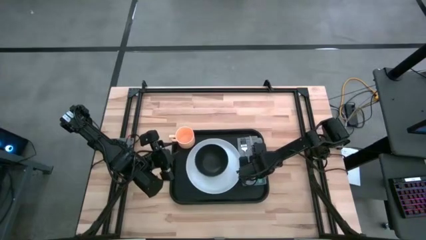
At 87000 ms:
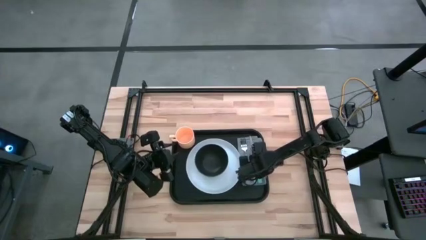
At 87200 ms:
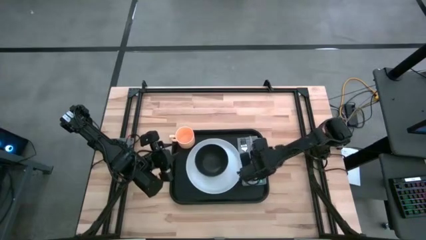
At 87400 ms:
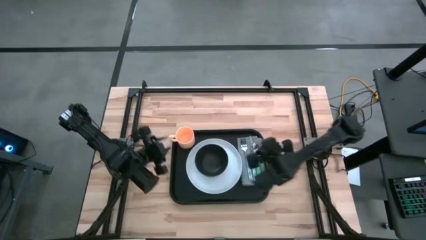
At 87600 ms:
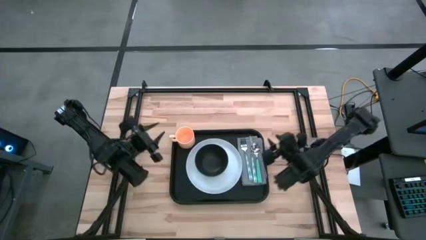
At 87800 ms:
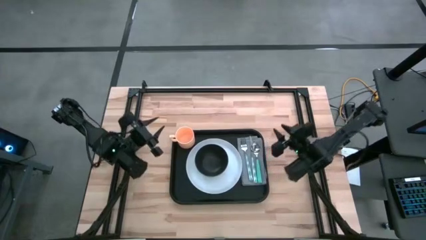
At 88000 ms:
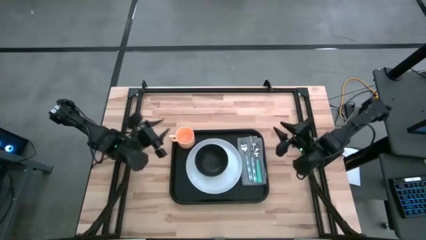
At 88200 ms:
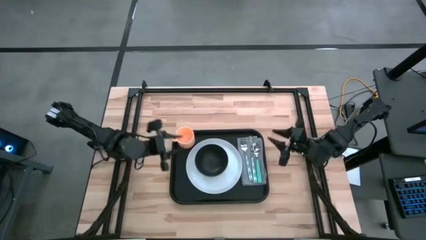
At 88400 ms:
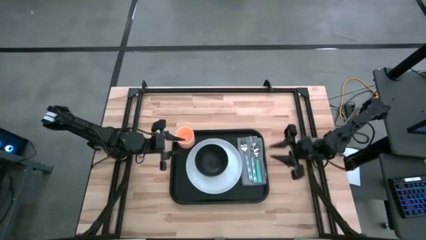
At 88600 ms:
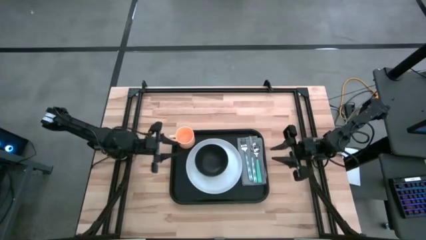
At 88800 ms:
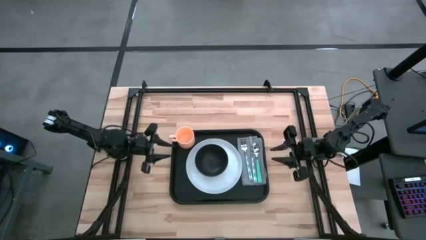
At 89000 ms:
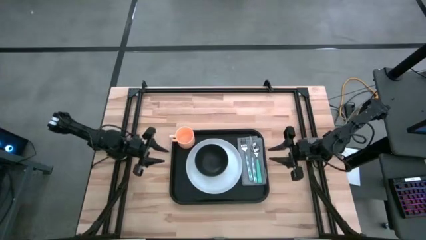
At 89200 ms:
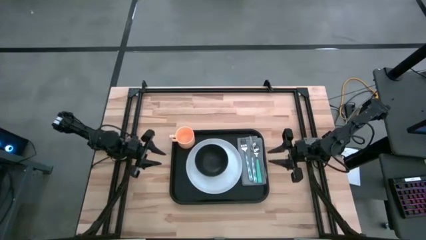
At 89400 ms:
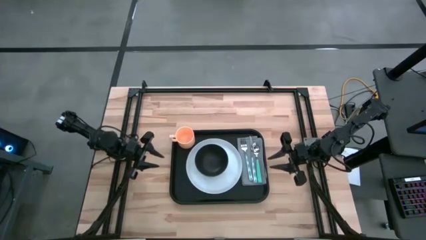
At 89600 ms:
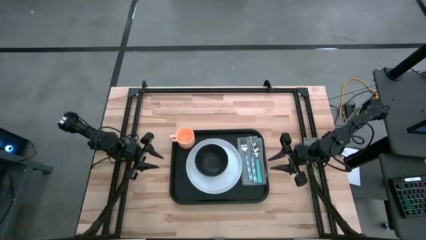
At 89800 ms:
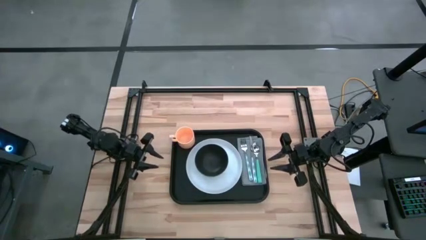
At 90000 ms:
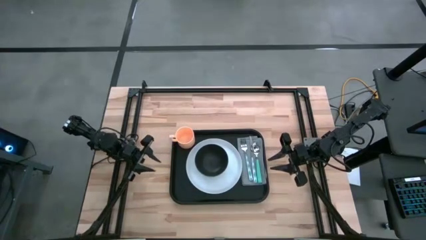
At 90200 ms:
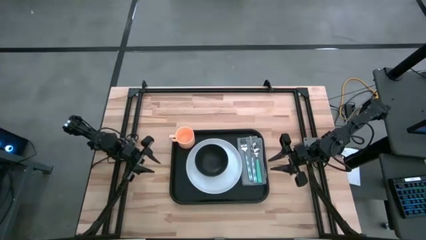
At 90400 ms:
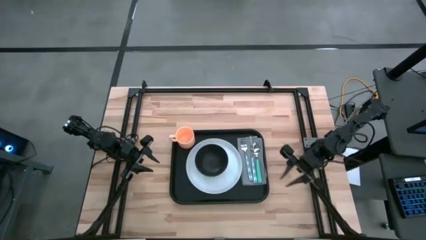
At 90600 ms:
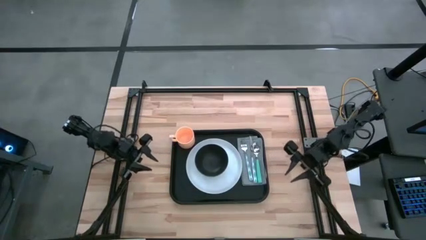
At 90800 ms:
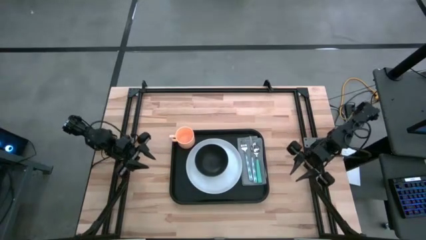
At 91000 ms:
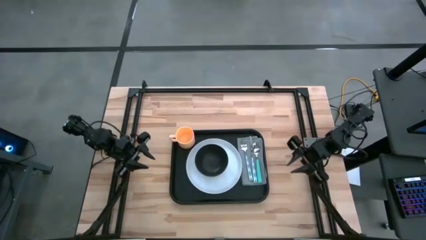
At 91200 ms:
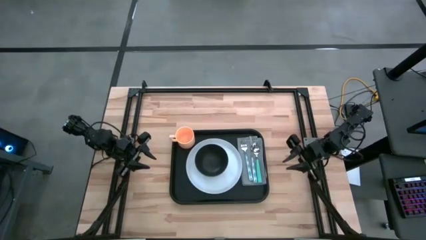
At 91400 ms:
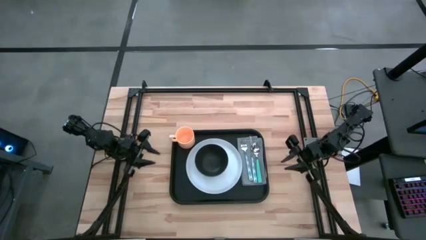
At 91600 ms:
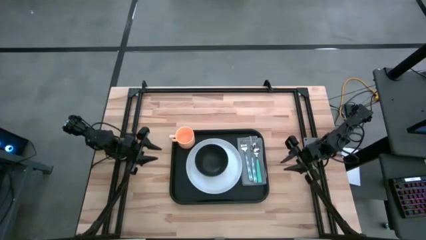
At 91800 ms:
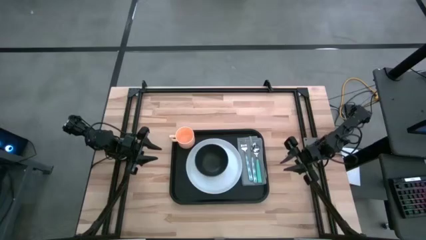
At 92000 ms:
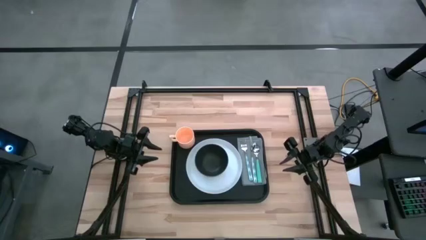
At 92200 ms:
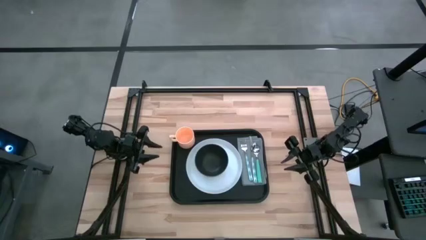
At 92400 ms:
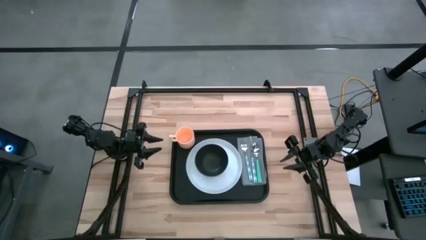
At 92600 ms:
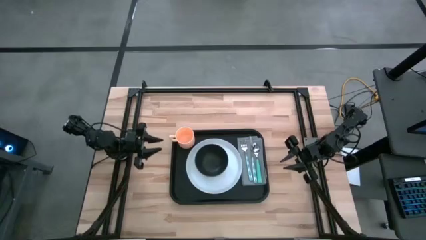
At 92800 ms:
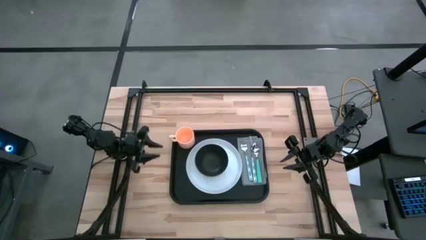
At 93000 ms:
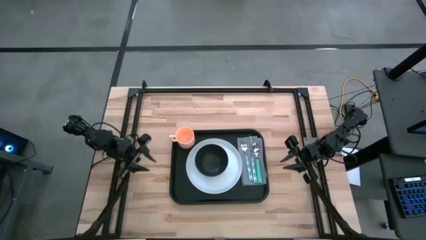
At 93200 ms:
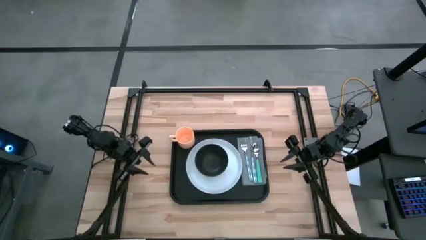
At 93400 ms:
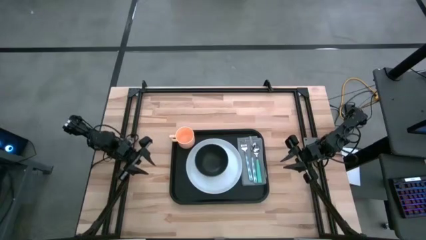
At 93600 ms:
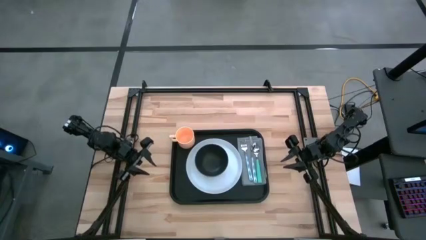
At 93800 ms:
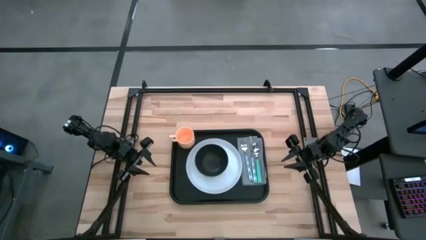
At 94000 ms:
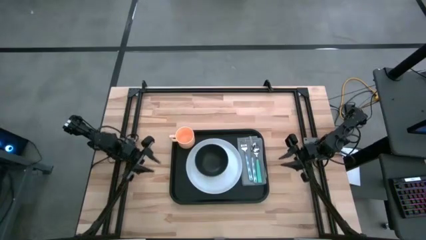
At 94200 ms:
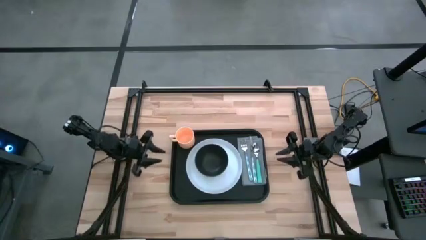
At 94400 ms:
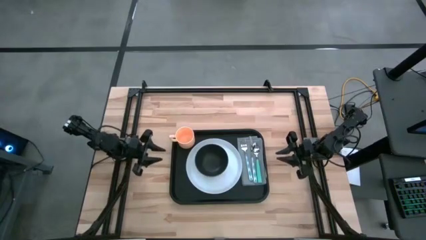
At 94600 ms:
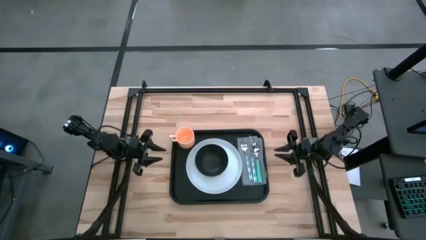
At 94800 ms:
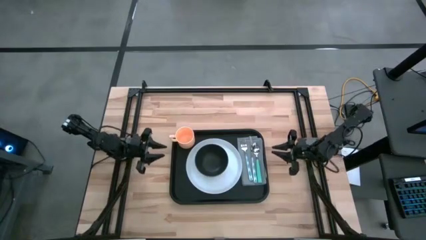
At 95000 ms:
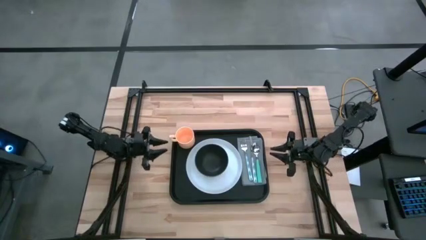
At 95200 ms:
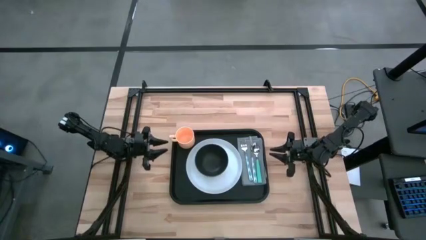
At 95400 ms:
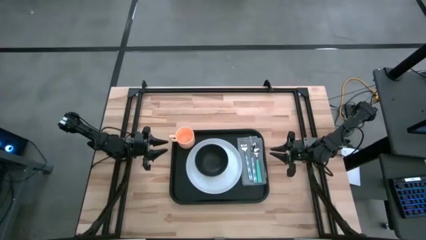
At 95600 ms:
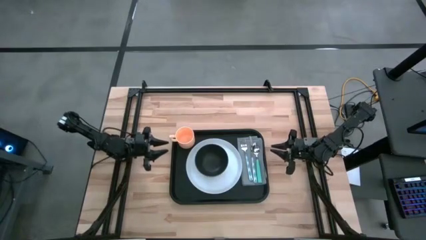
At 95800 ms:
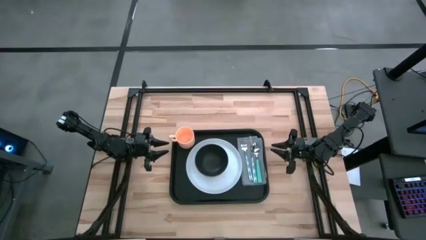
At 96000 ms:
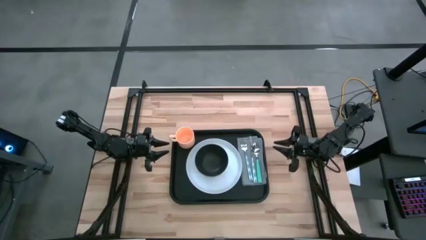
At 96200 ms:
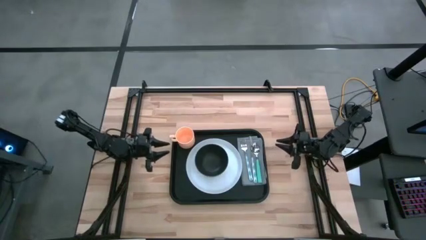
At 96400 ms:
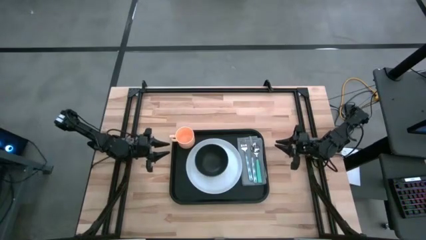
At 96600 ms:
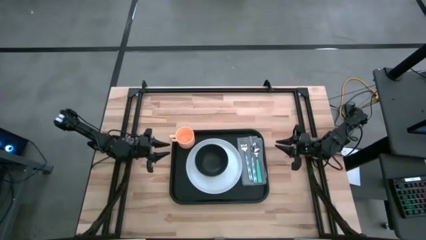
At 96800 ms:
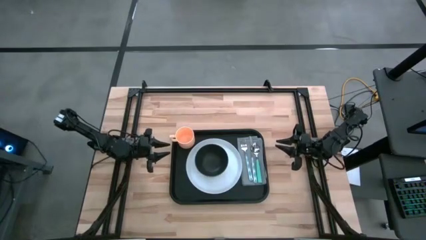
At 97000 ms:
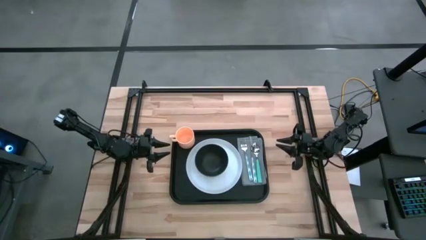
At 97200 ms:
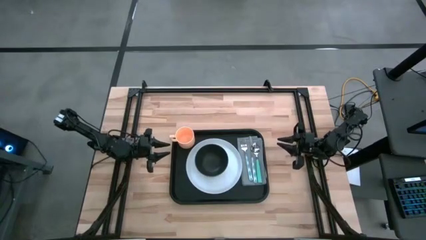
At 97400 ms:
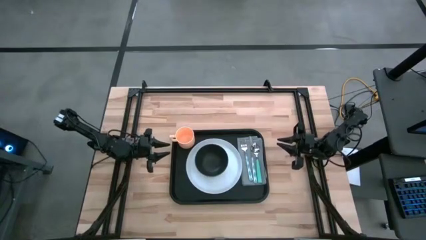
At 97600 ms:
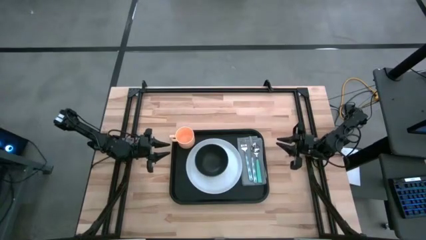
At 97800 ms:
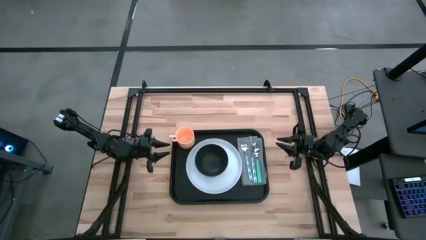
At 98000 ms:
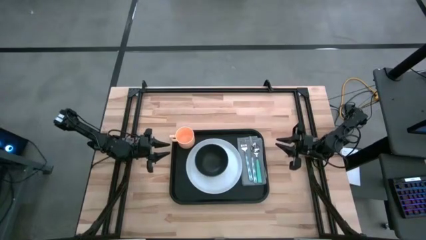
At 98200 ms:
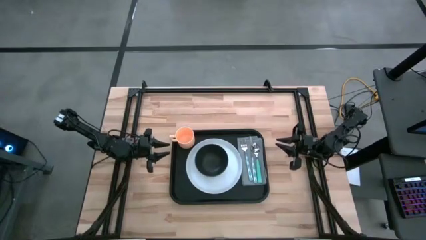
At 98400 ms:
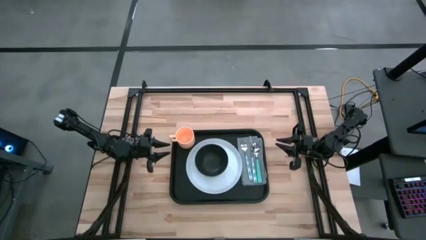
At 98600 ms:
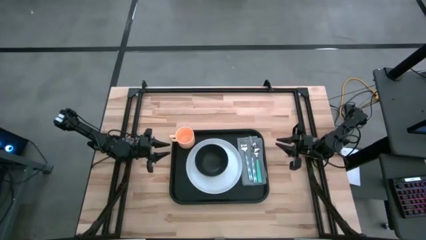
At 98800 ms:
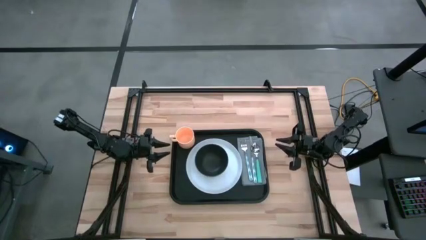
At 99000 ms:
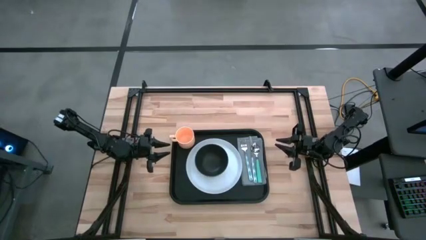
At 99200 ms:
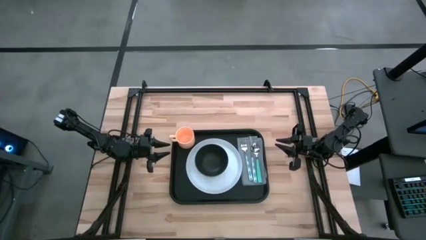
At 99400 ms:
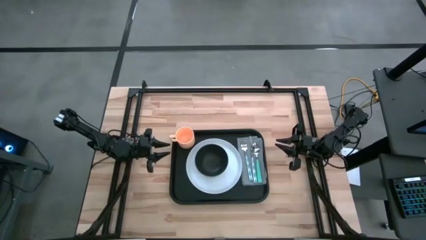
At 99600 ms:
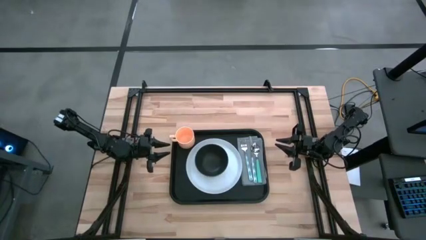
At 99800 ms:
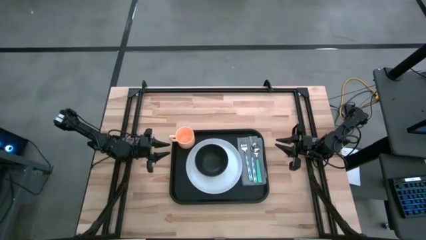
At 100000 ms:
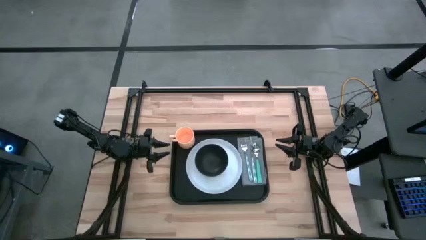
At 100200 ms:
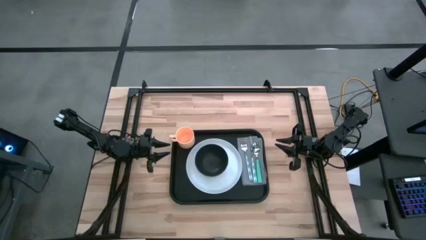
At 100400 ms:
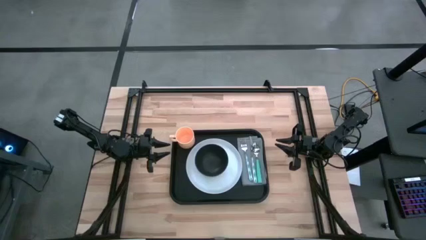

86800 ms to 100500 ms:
Task: Set up tray
Return to Home Position
